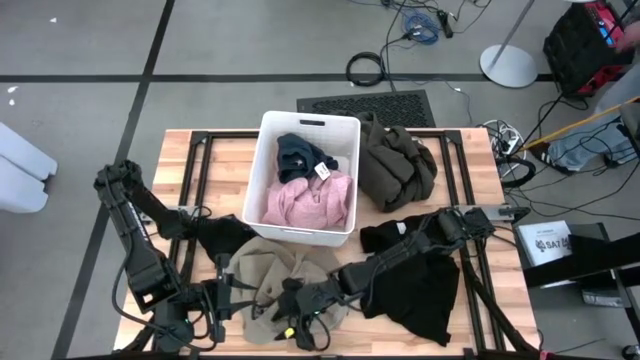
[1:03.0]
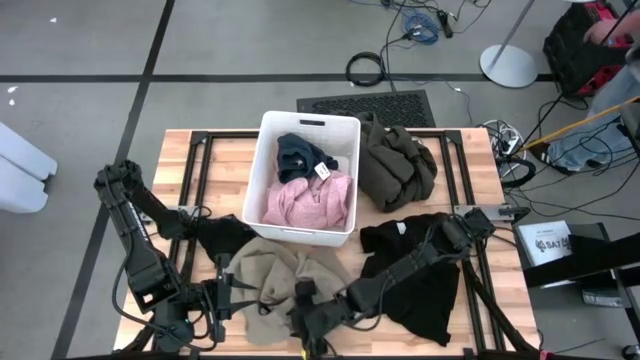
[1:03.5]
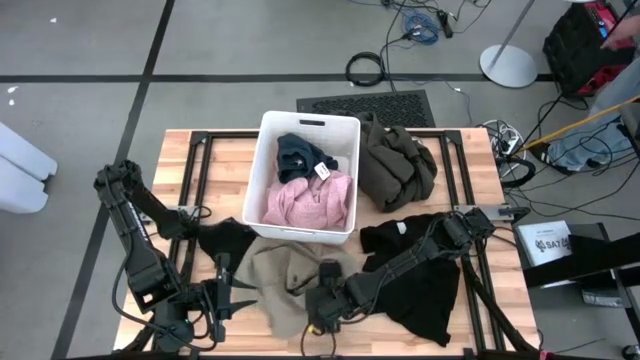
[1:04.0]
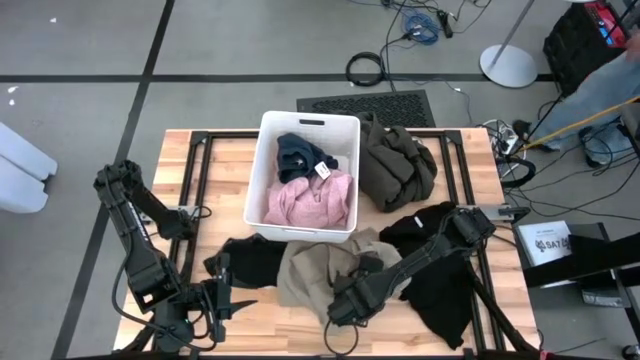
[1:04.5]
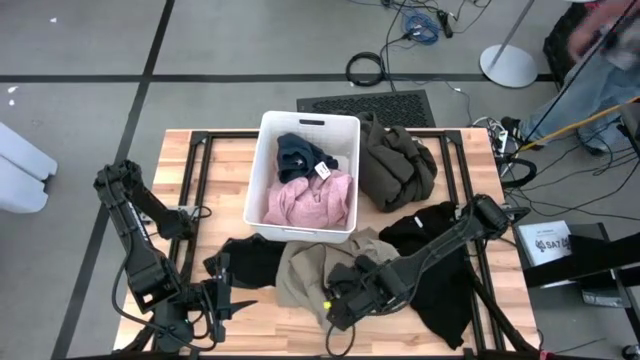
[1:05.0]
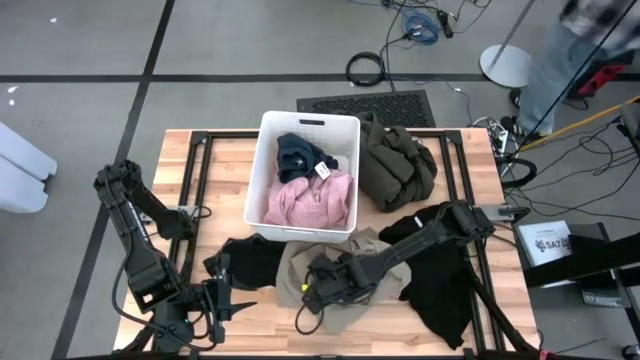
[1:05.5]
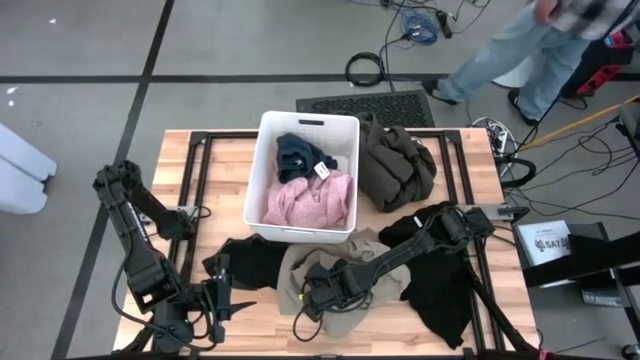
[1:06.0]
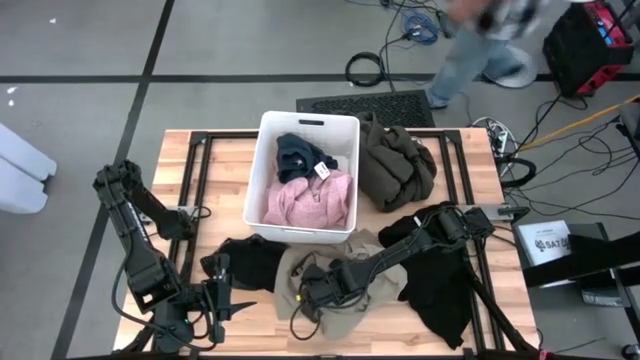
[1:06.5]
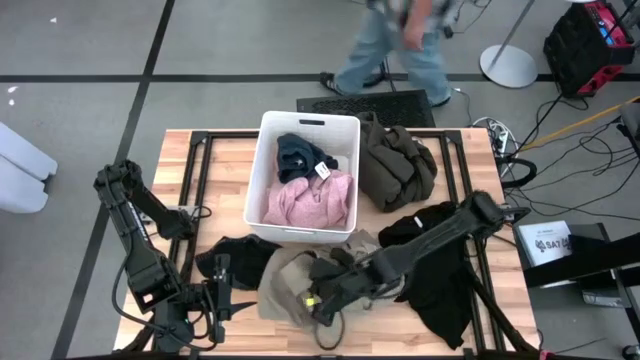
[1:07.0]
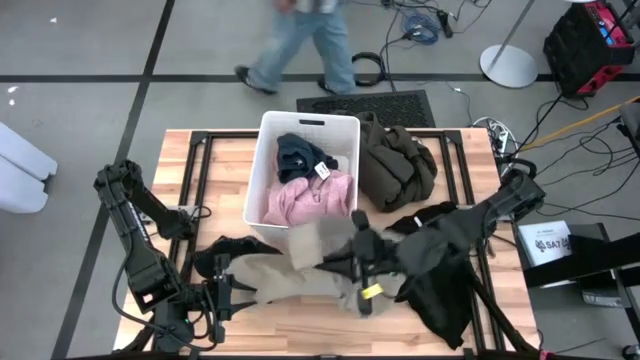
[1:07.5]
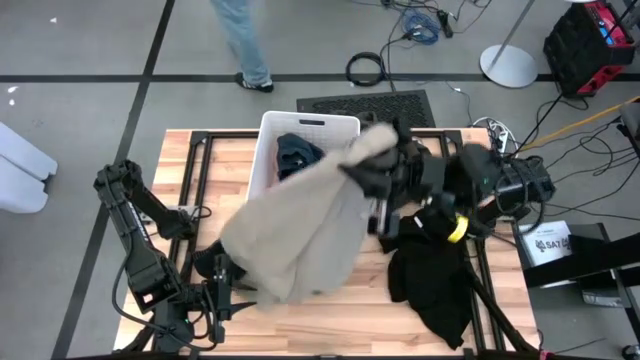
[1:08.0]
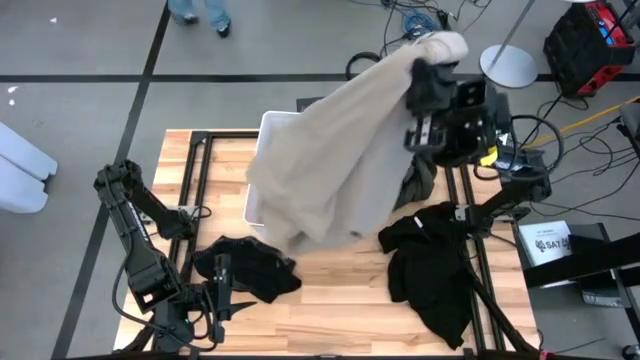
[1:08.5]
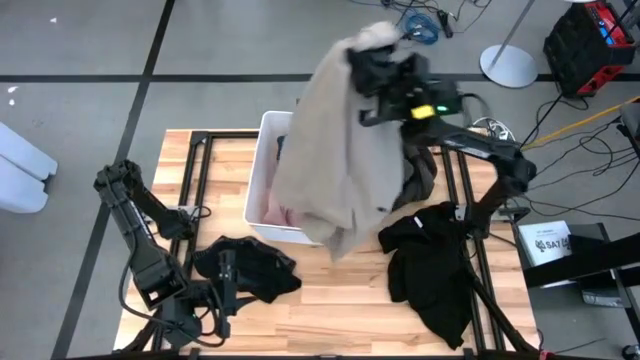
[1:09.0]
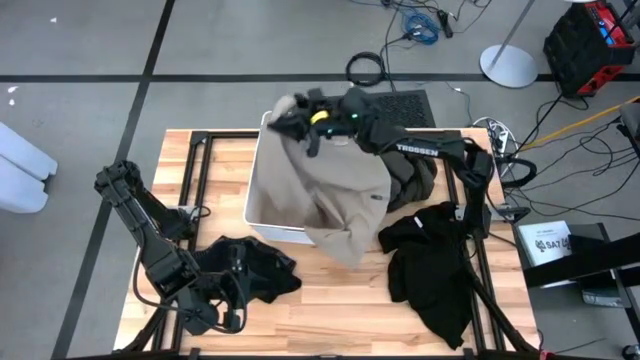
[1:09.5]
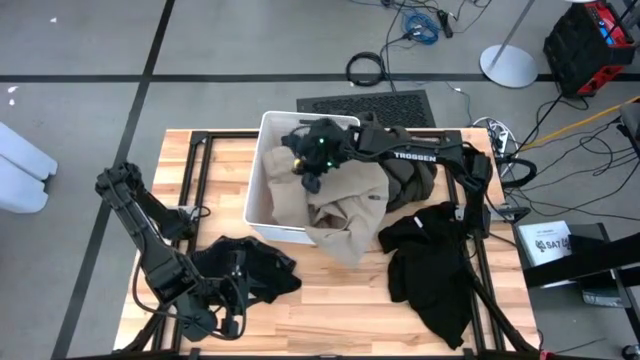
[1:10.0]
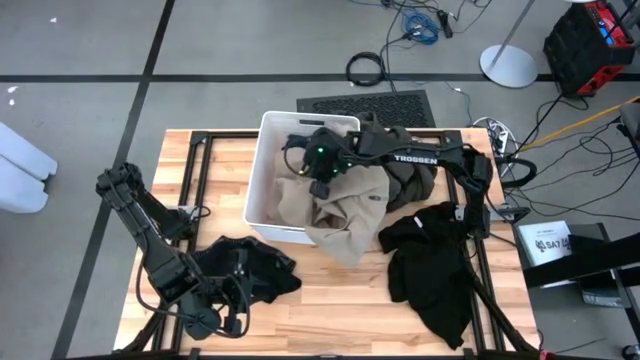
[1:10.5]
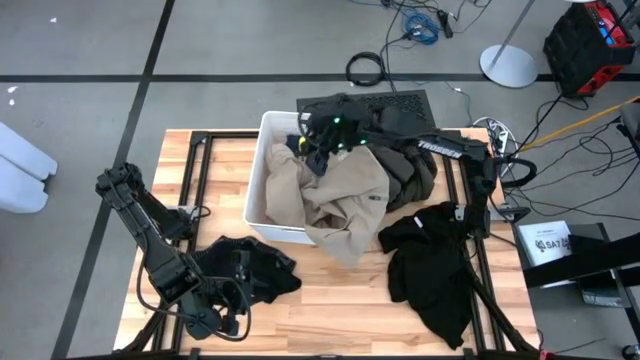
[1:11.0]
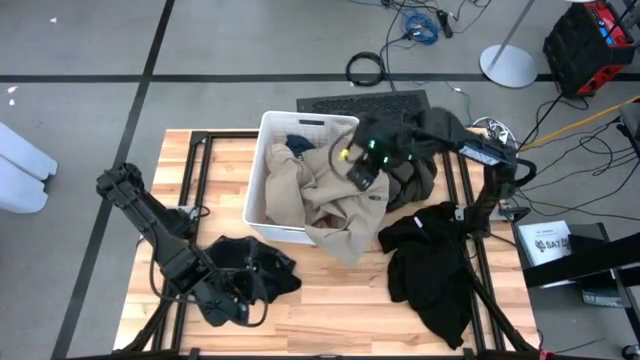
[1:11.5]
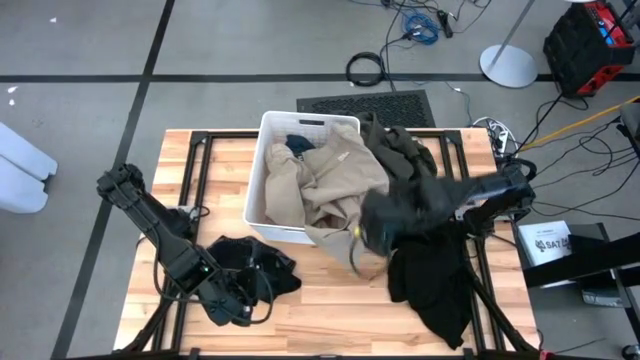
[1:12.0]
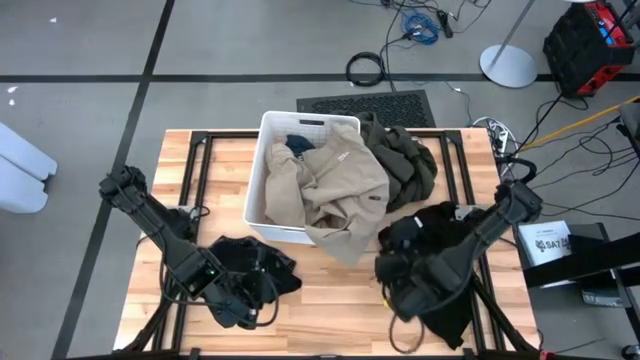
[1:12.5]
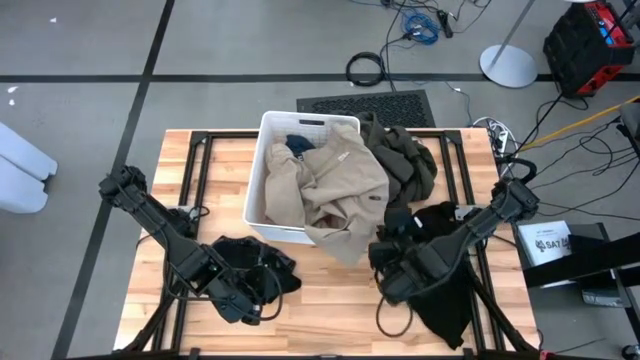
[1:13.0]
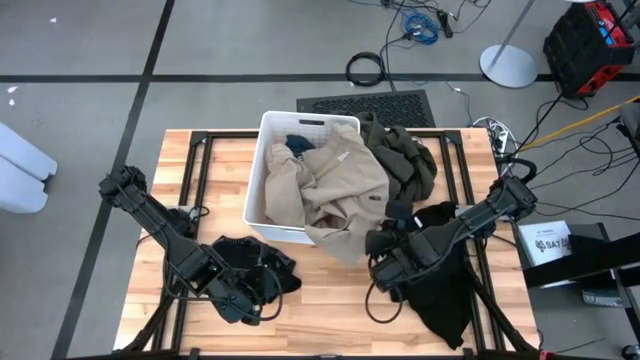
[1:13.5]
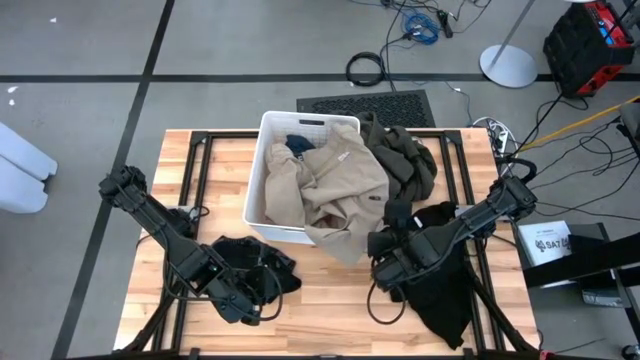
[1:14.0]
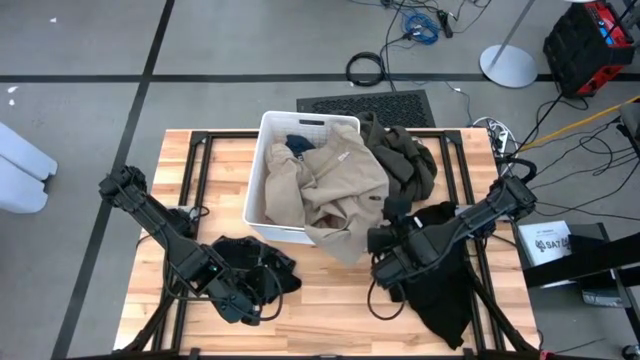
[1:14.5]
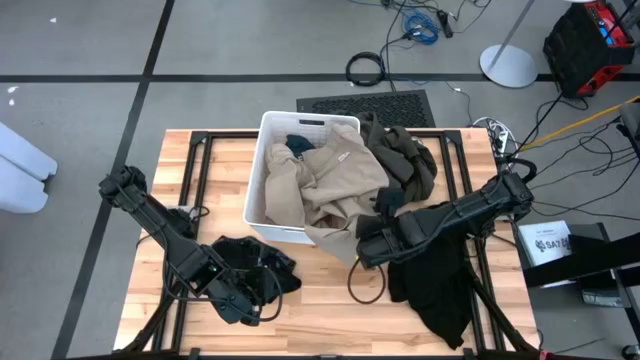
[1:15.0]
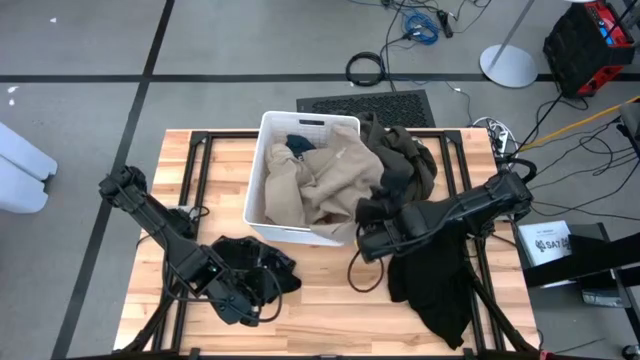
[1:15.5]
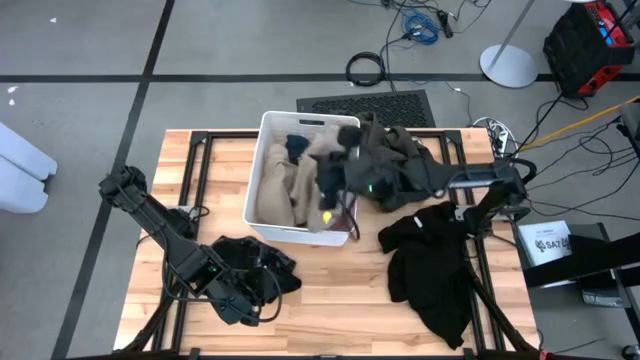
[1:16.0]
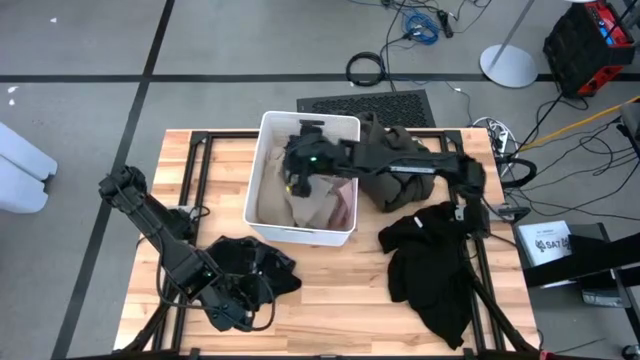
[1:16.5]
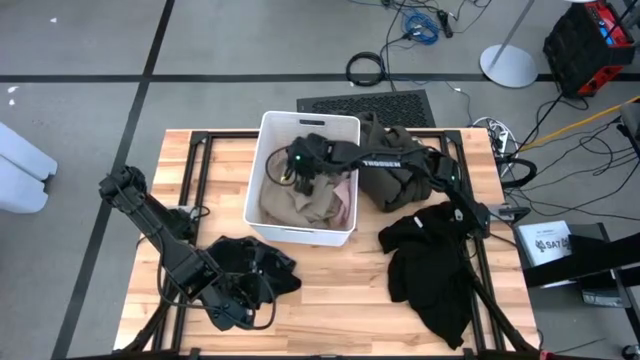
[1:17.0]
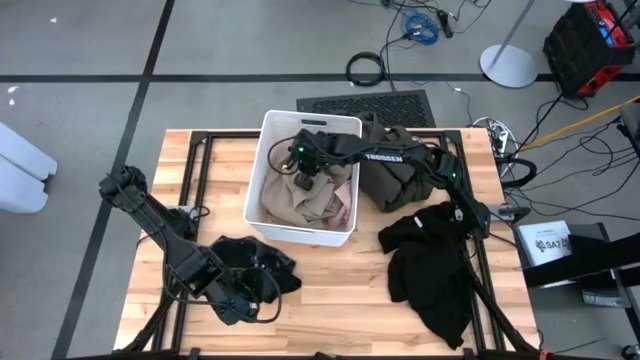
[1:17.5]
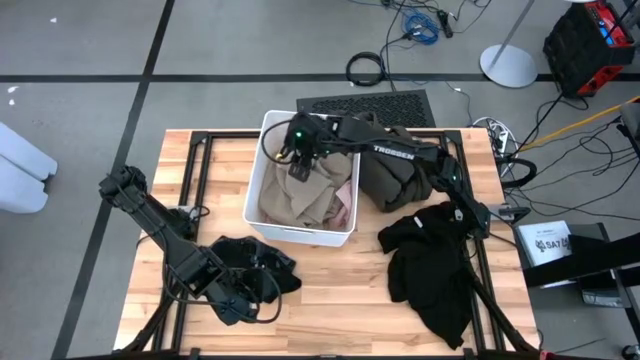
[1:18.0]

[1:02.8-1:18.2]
Task: Sort clothes
Put the brown shorts into the white laundry bin

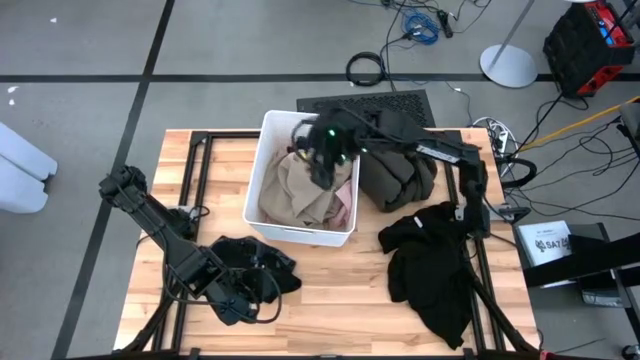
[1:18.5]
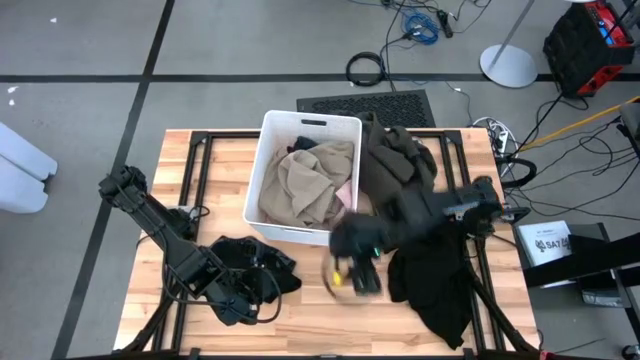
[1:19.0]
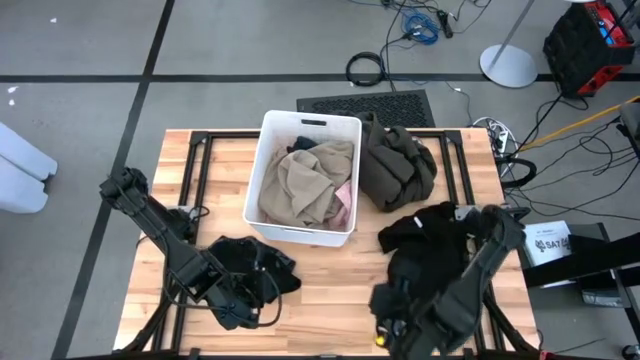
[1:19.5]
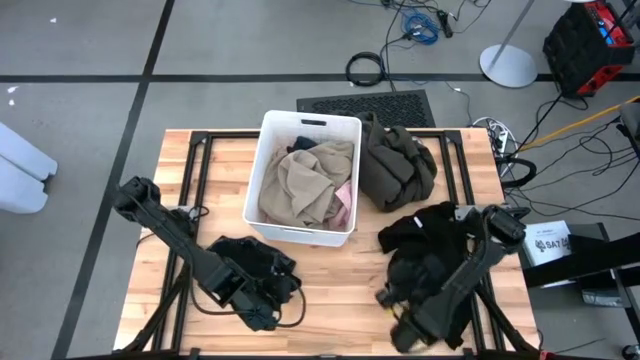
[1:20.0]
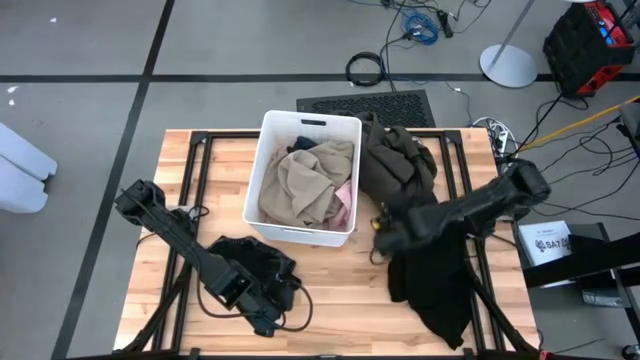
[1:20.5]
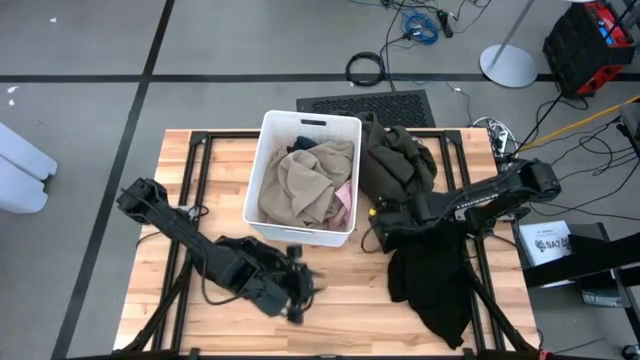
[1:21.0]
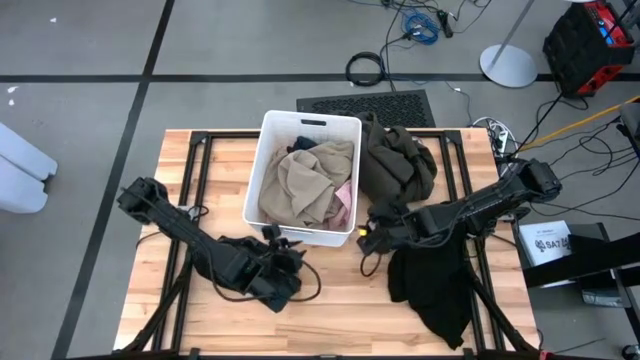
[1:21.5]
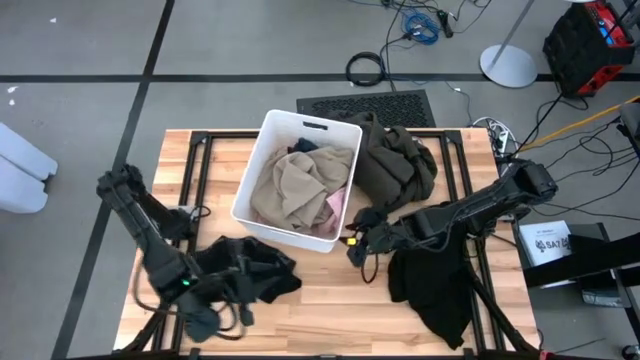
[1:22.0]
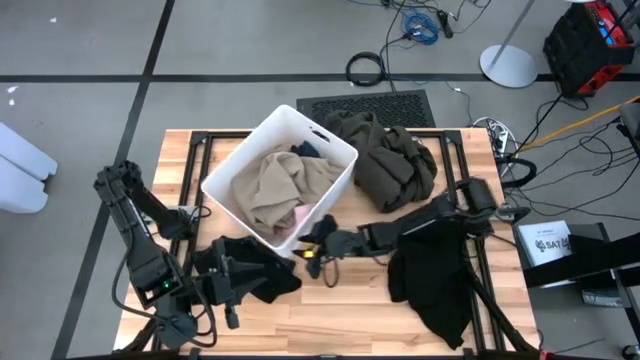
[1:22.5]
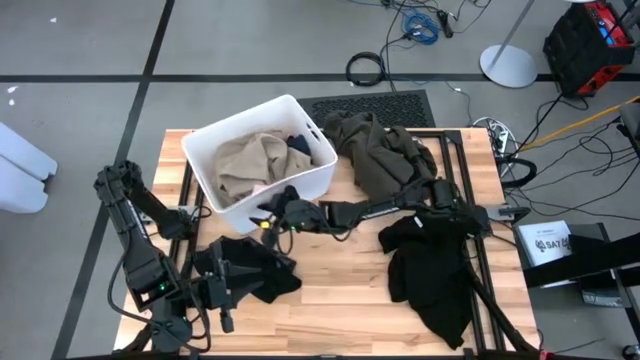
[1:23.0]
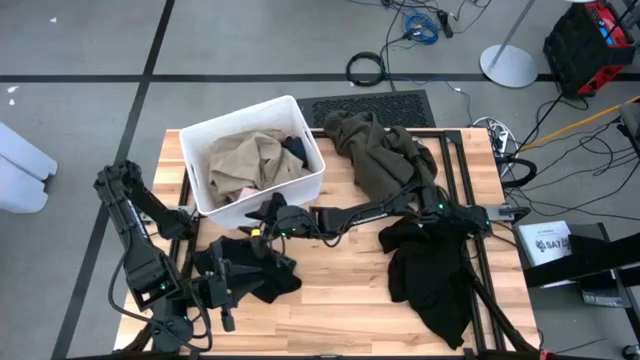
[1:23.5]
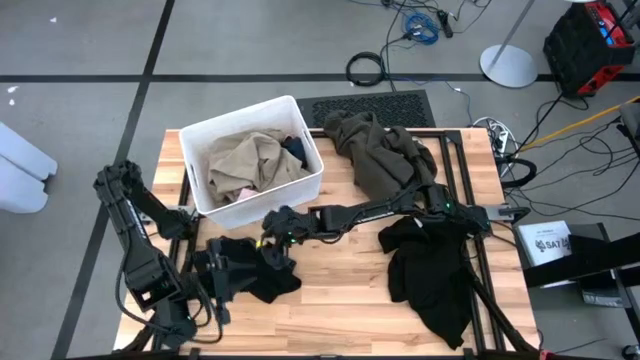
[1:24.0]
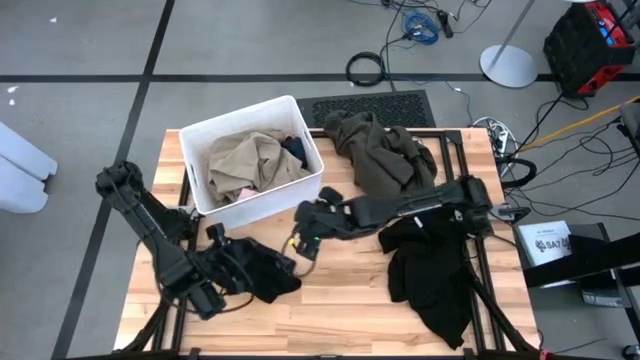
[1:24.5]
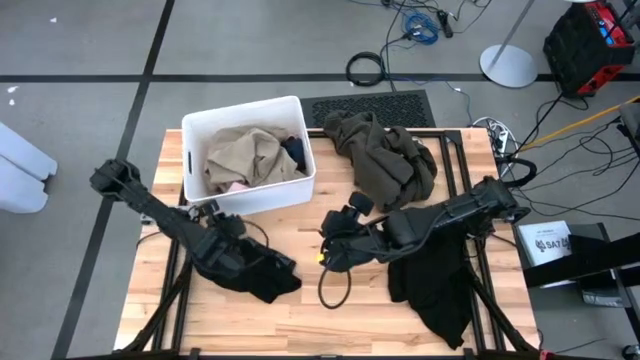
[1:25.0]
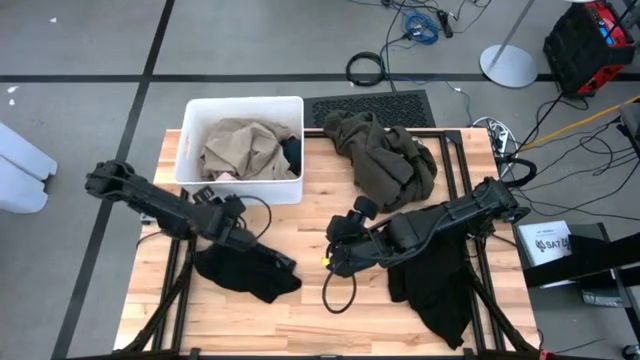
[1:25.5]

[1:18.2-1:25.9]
Move the white laundry bin to the upper left of the table
